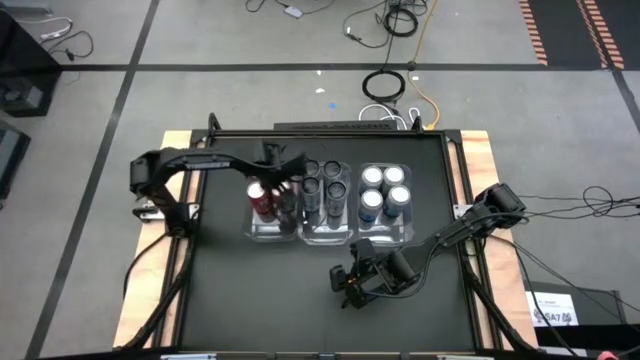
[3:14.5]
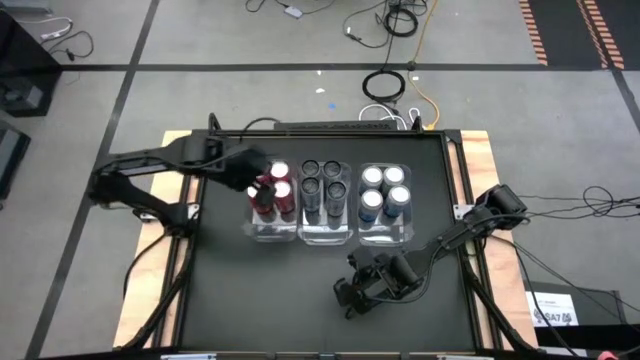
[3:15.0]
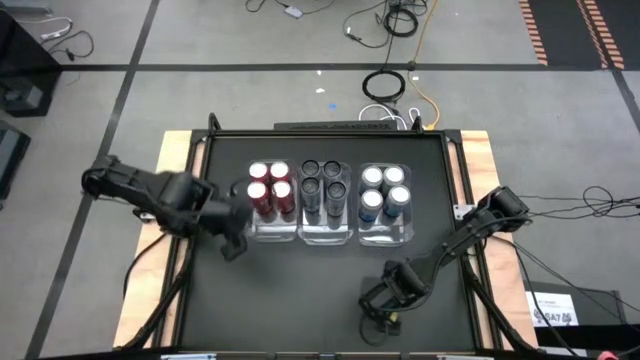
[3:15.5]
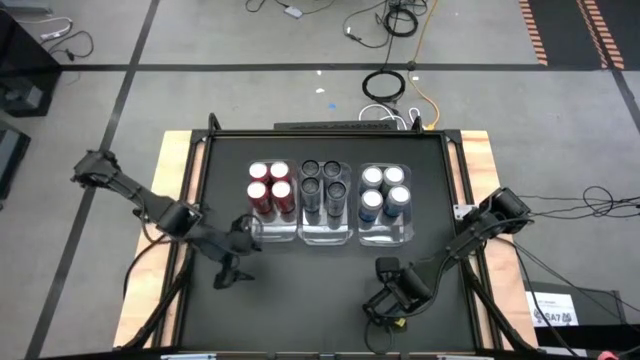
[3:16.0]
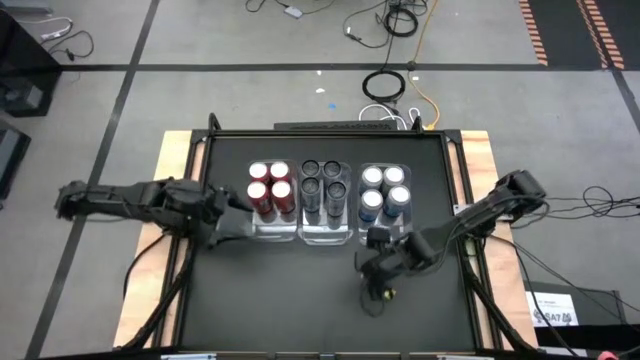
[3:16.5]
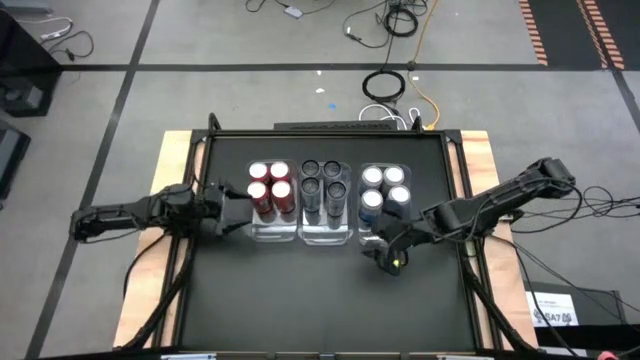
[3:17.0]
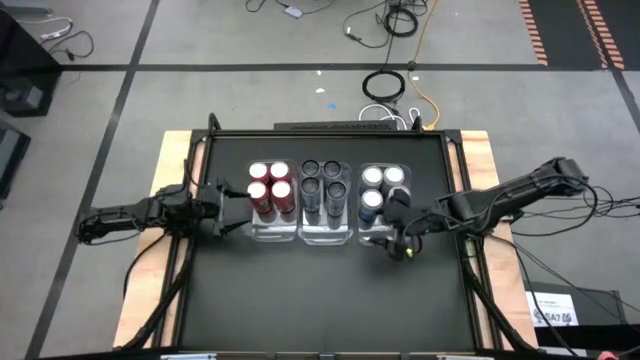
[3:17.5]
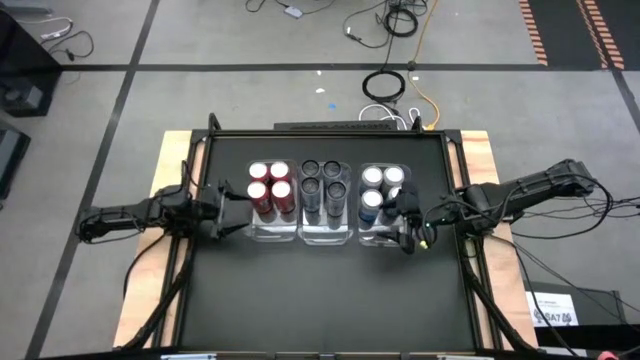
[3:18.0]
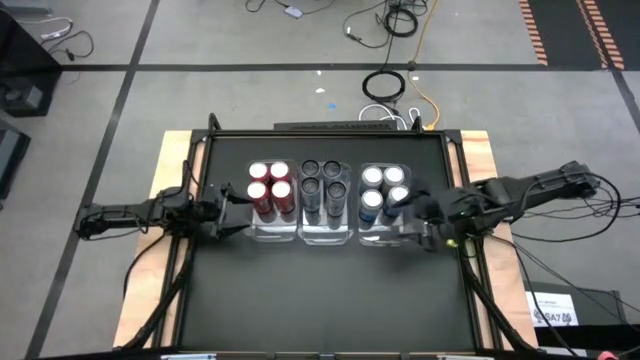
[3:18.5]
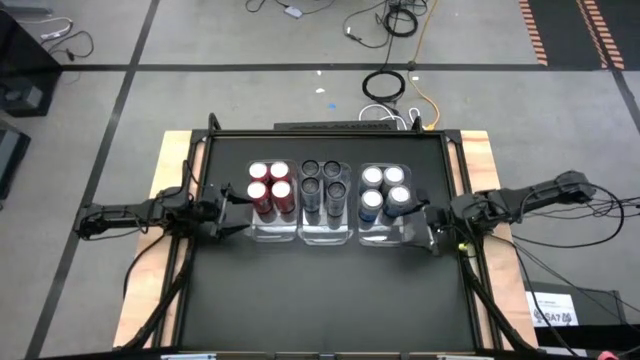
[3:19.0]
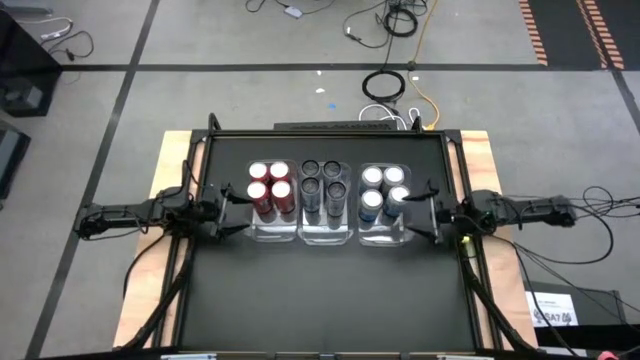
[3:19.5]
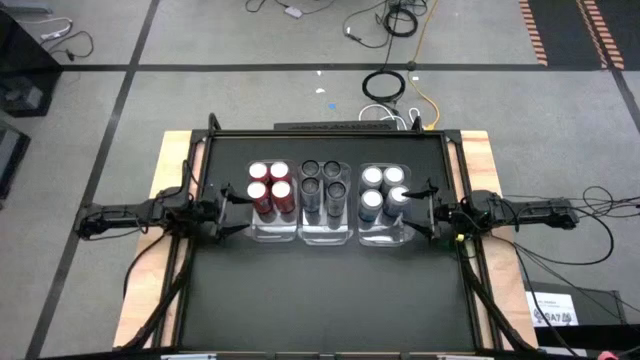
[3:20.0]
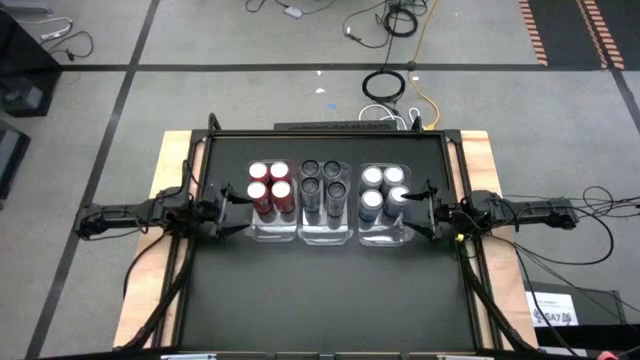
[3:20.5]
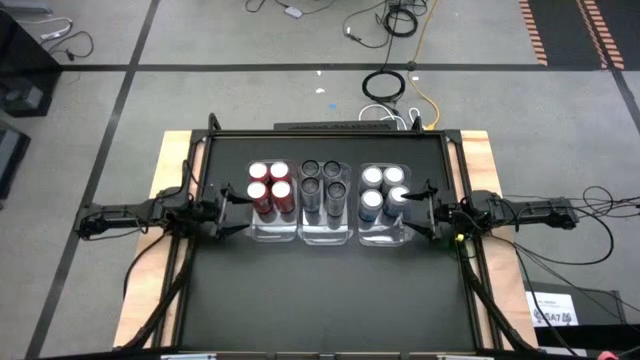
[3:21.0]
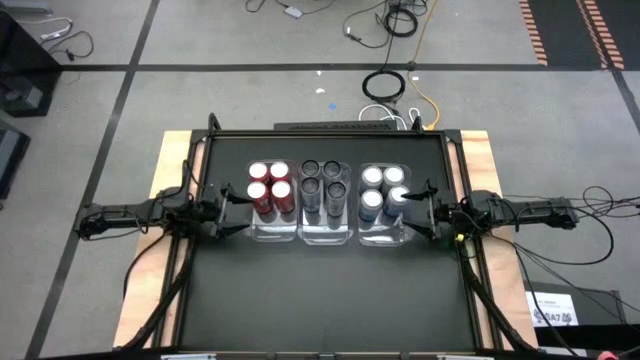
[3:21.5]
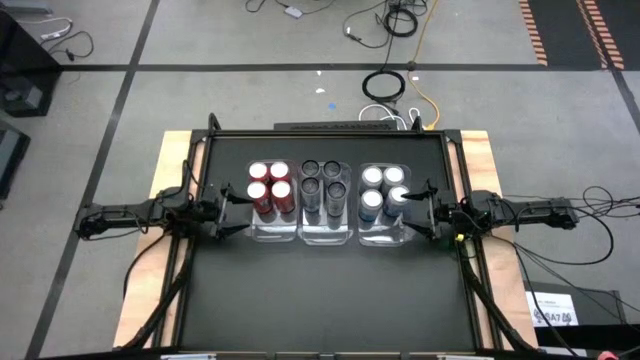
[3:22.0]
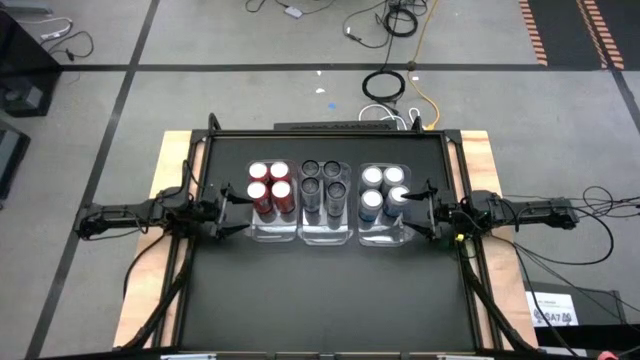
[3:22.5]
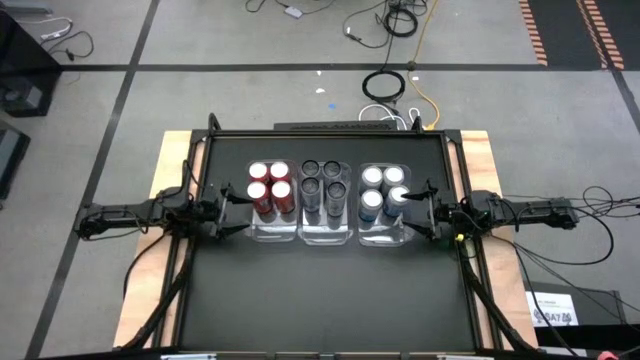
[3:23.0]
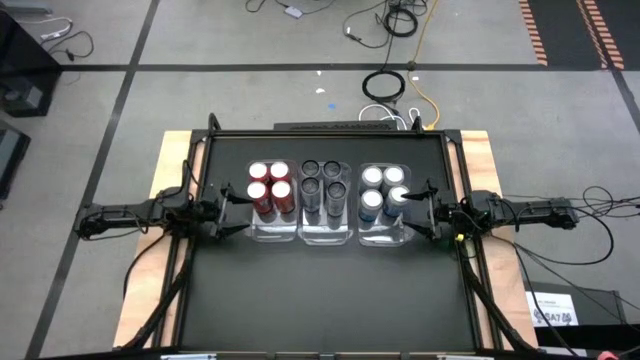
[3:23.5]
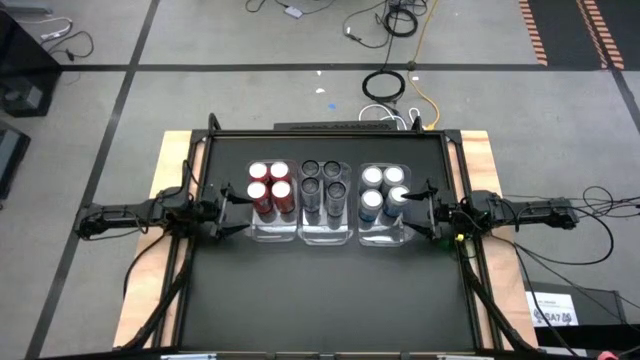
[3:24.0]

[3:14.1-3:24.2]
Task: Sort soda cans
Return to Home Position

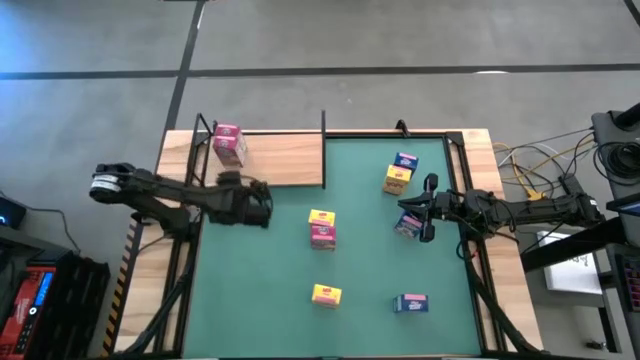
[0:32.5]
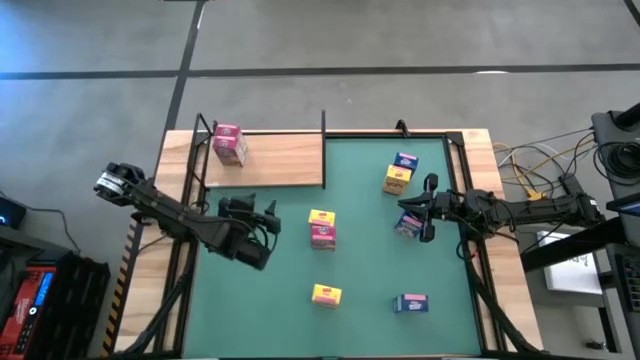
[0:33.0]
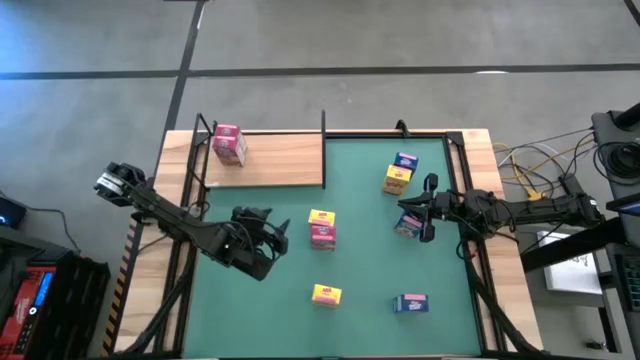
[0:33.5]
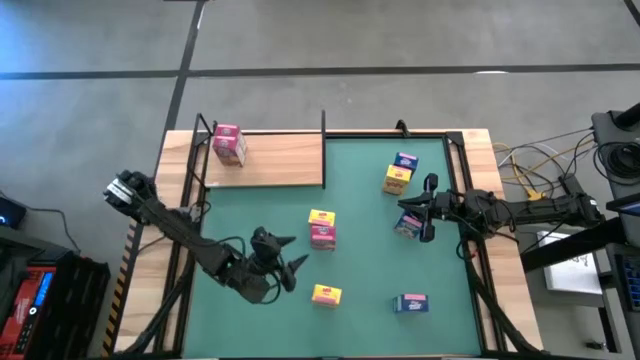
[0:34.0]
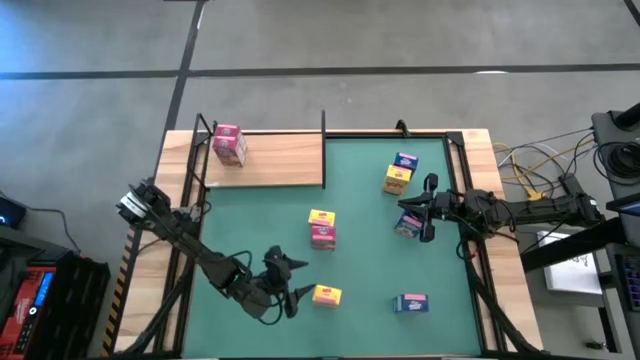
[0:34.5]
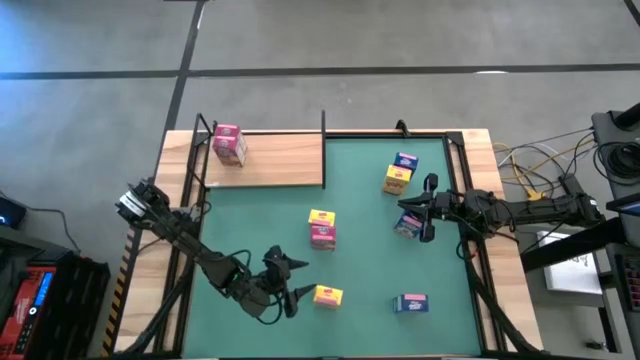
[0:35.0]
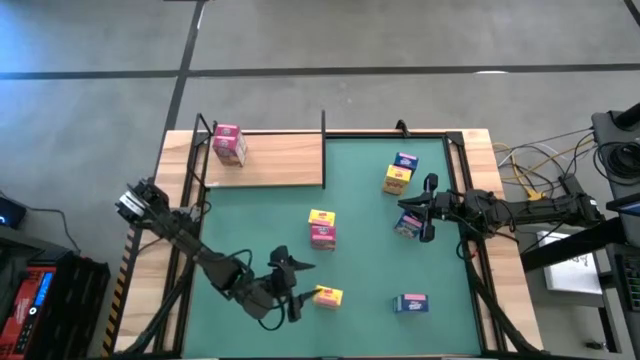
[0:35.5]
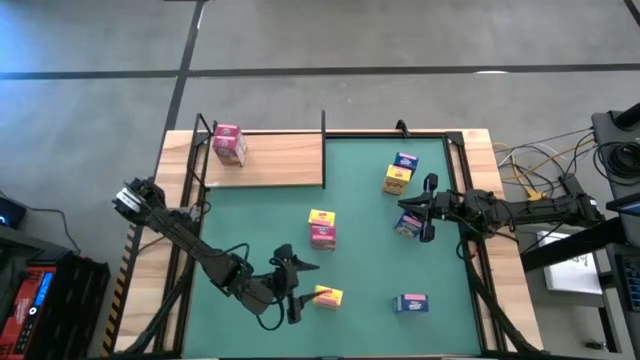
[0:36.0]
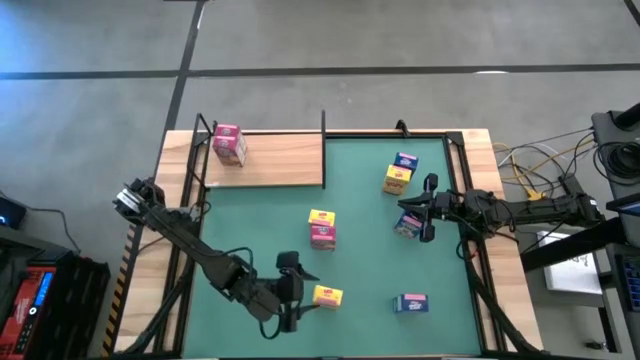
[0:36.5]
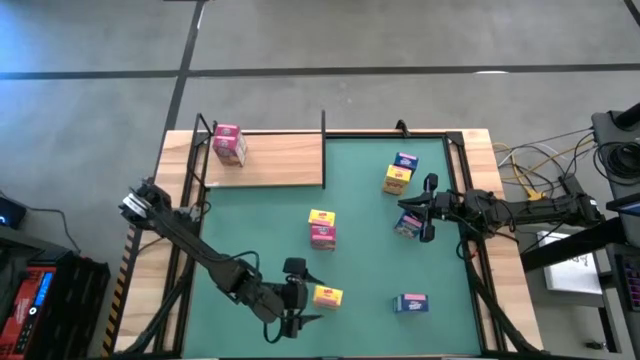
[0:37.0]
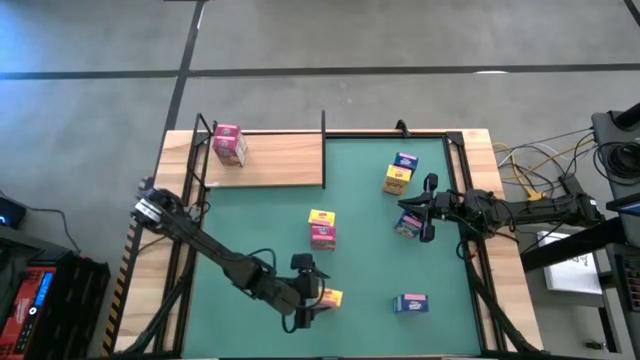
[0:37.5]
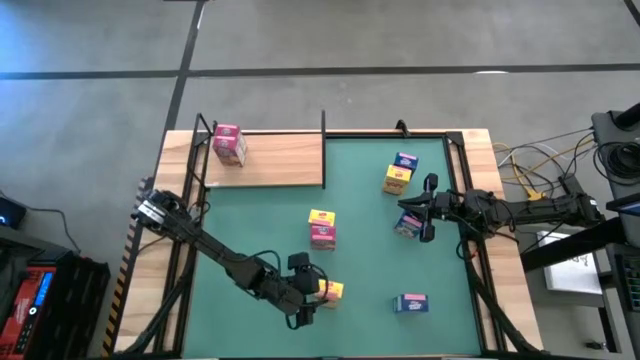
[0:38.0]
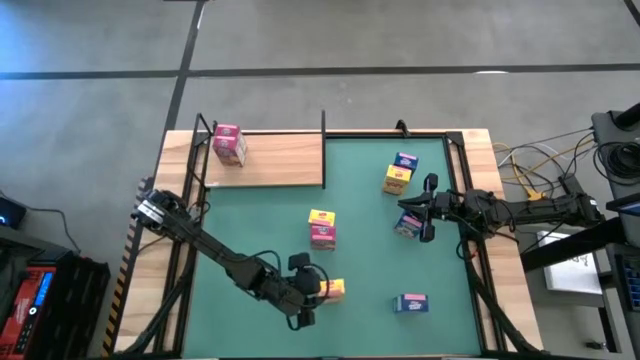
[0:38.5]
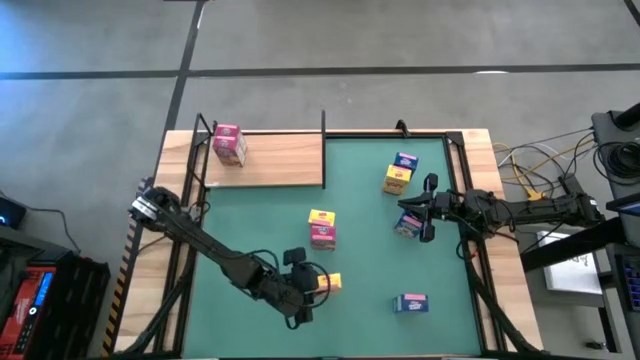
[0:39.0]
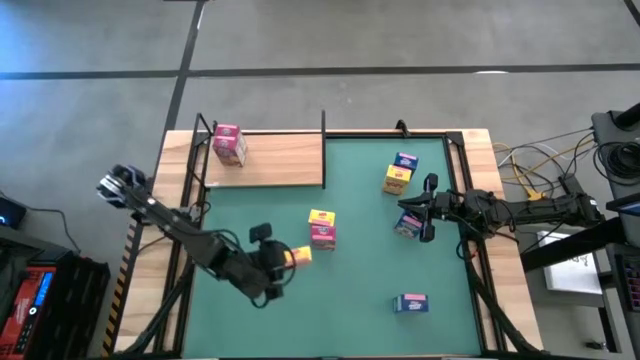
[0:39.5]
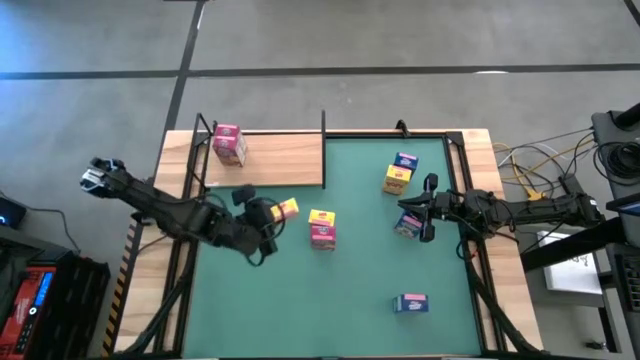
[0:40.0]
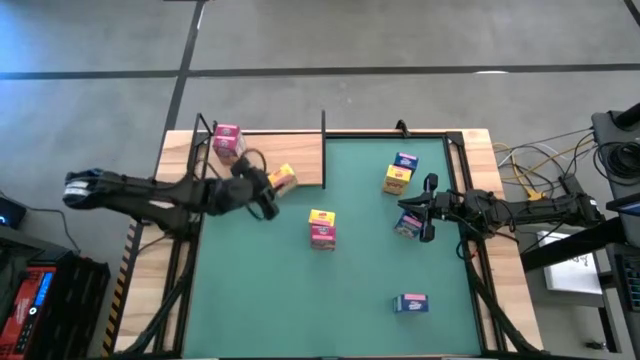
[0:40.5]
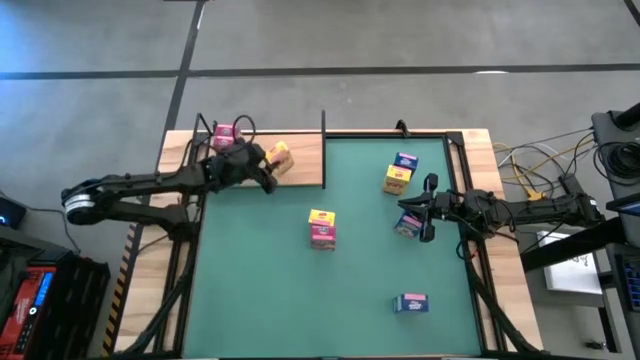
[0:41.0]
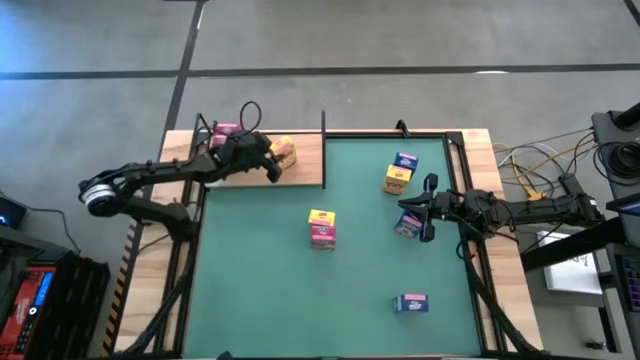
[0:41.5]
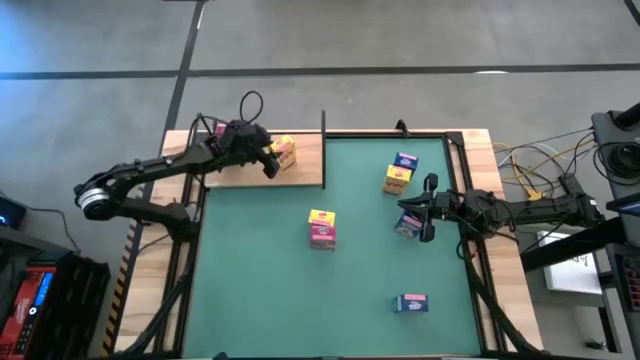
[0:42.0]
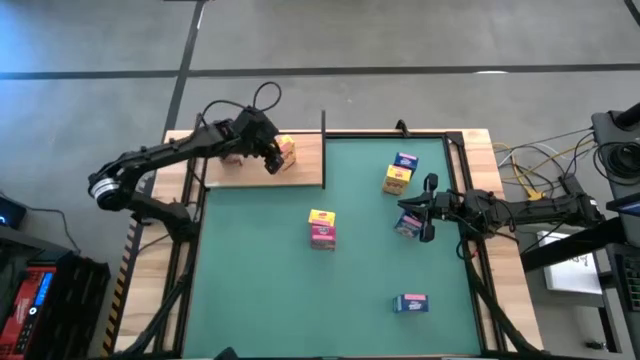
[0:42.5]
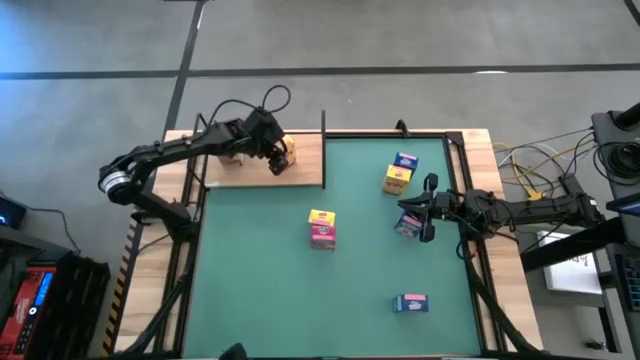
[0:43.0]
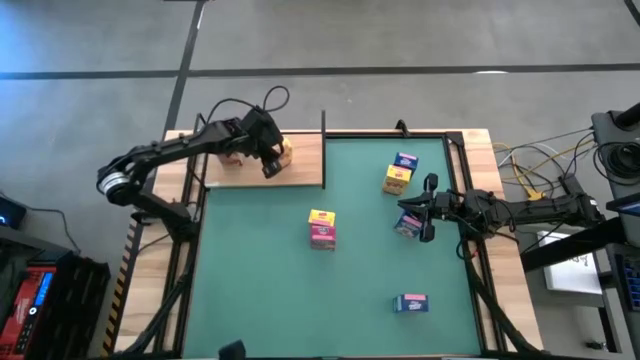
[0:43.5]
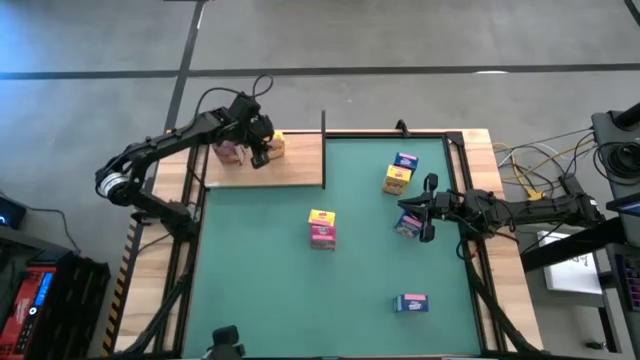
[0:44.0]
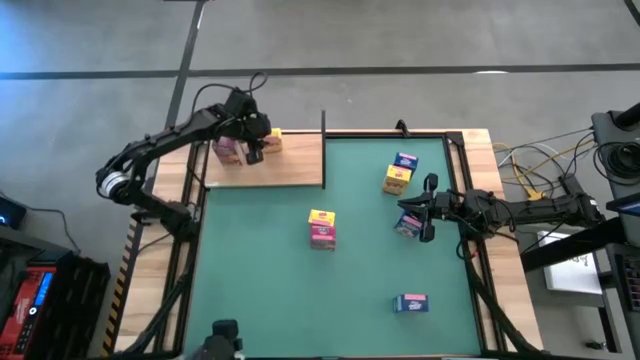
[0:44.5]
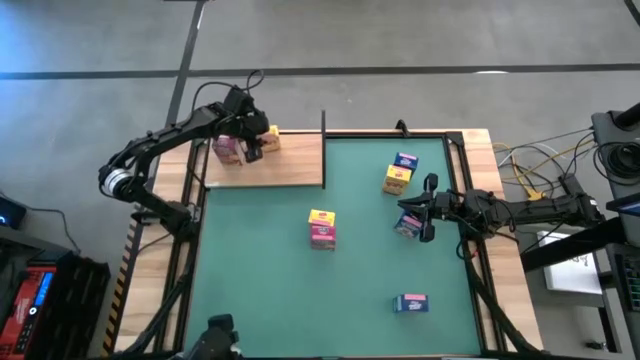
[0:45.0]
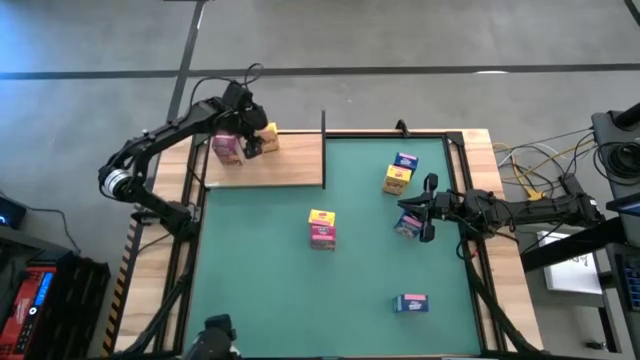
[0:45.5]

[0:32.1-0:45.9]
Task: Stack cereal on shelf
Put the bottom yellow cereal box on the shelf
